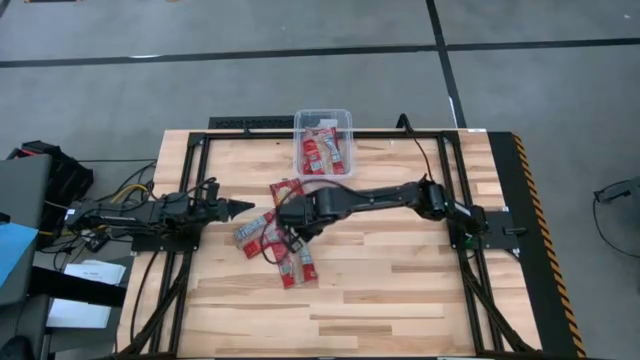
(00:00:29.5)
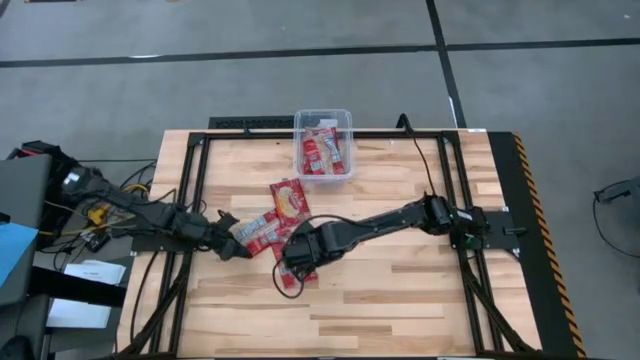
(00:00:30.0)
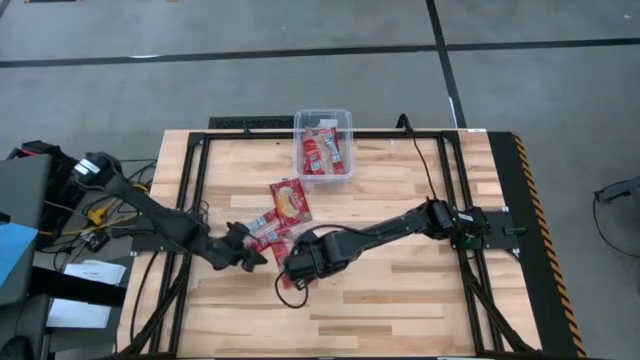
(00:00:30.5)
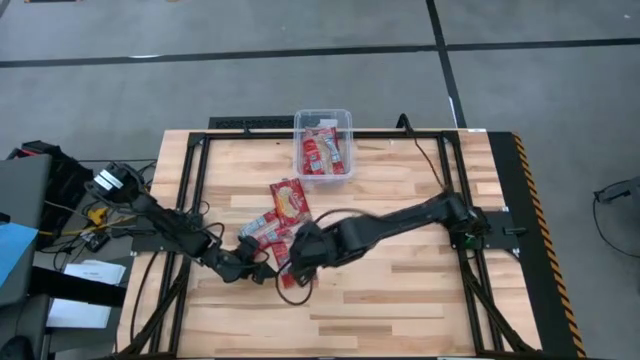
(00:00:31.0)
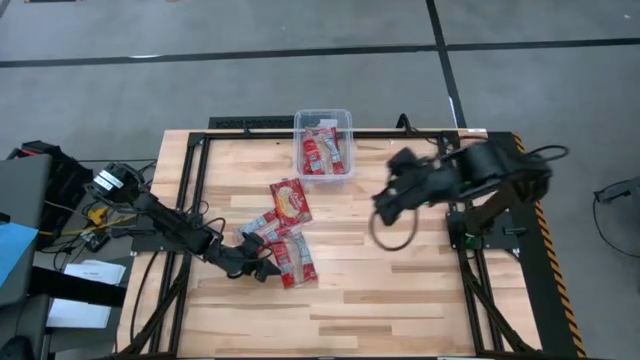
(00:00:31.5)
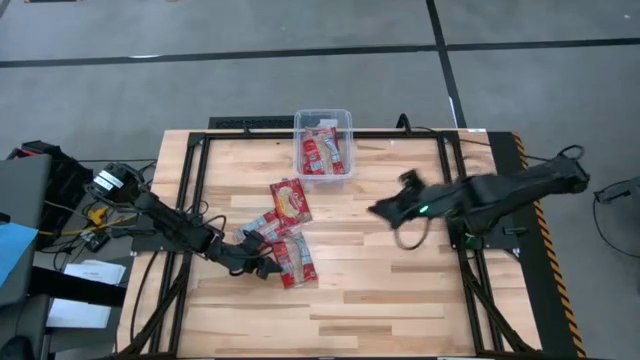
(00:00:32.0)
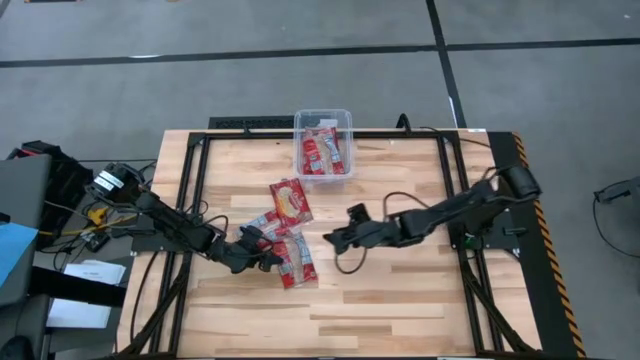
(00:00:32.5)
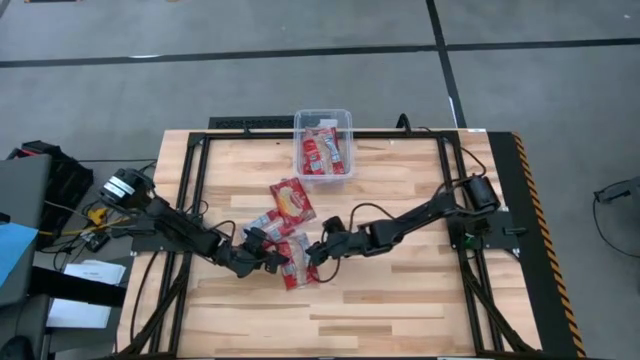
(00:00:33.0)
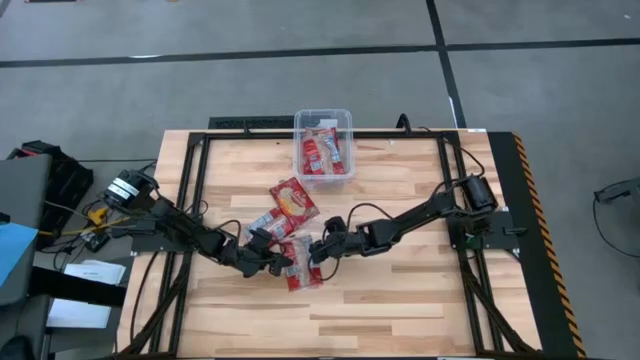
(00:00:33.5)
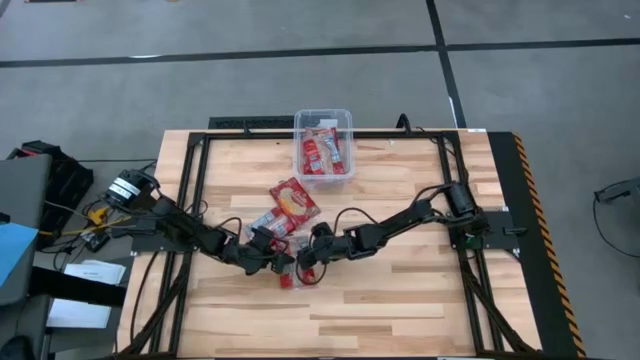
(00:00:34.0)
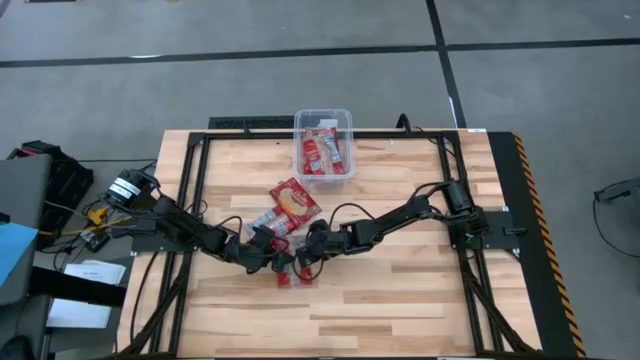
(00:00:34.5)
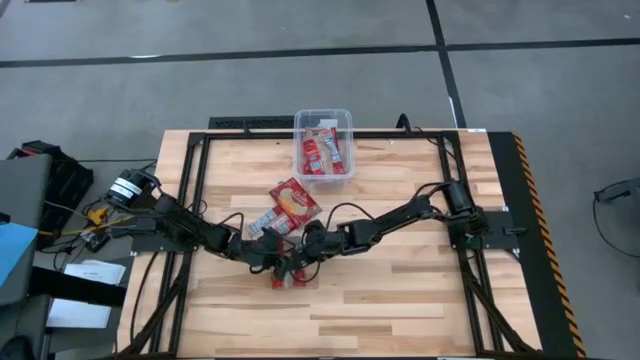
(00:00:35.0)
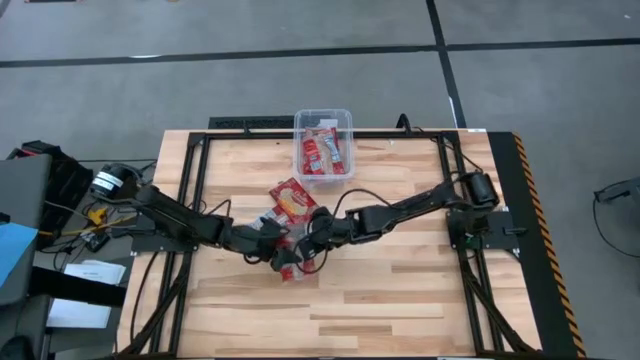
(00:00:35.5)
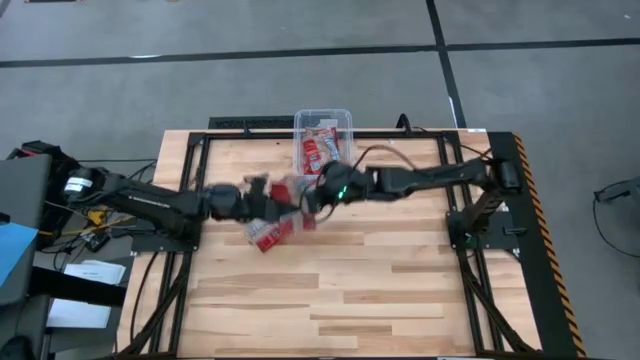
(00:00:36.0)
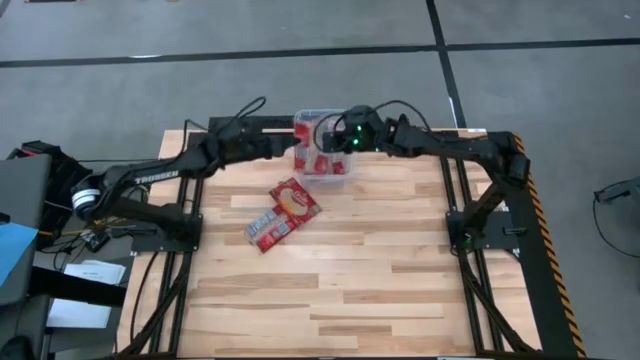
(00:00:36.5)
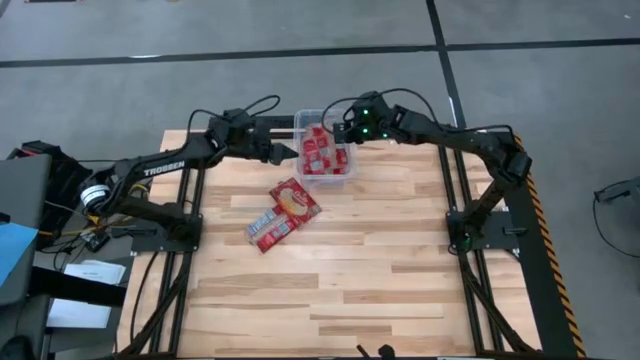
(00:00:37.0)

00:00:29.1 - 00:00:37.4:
Task: Sort popcorn bags into baskets
Put the red popcorn bag into the transparent bin

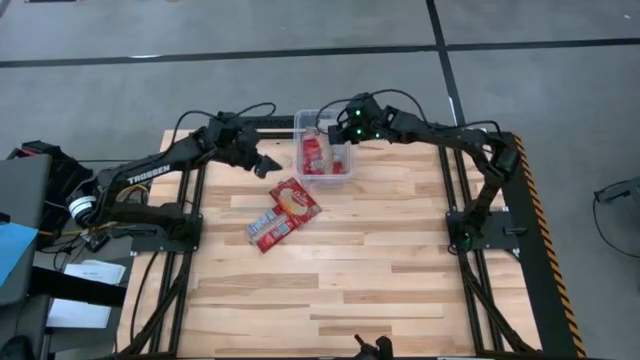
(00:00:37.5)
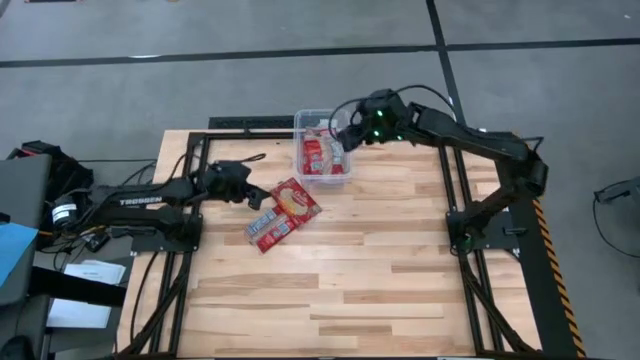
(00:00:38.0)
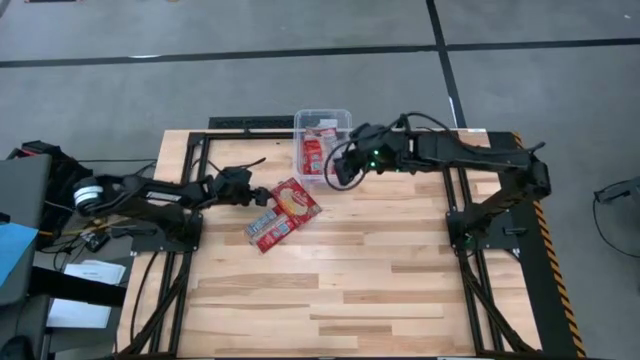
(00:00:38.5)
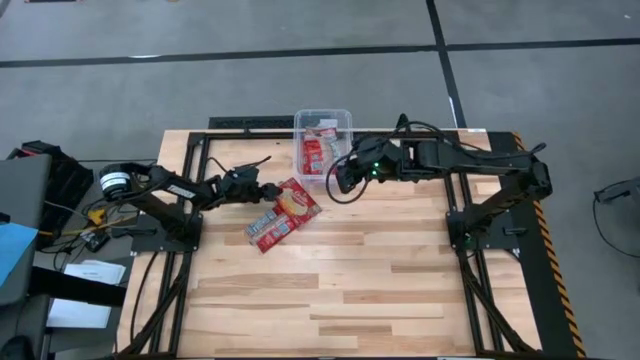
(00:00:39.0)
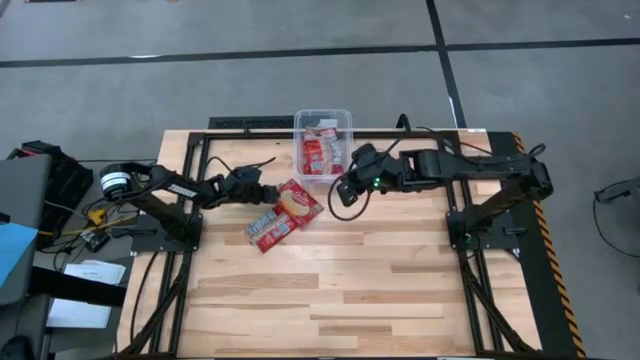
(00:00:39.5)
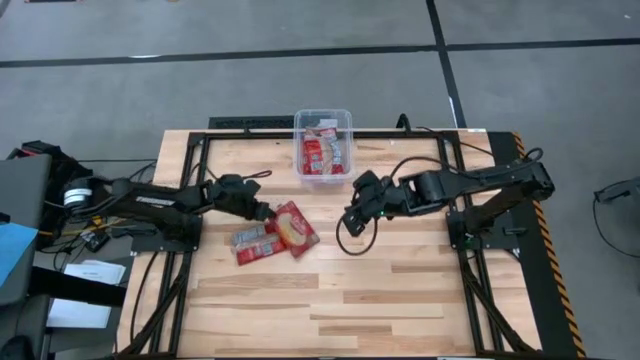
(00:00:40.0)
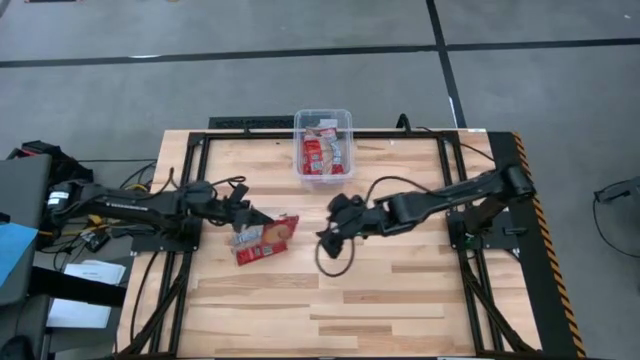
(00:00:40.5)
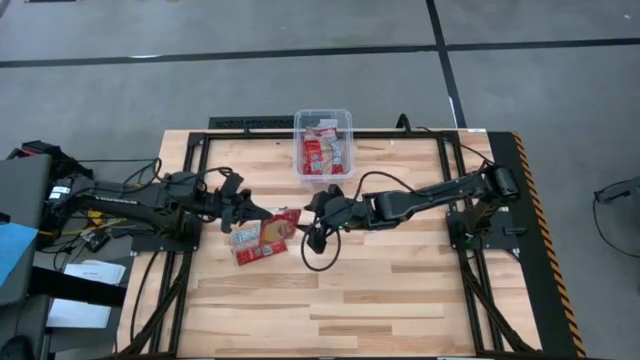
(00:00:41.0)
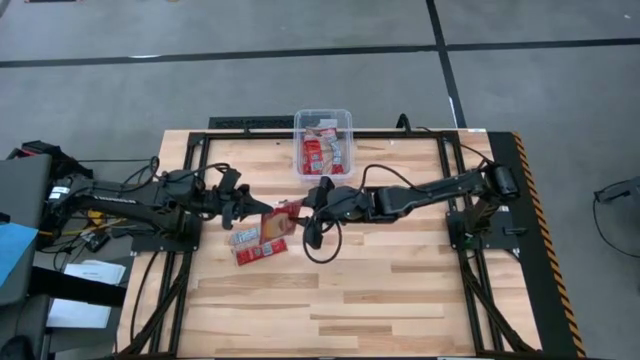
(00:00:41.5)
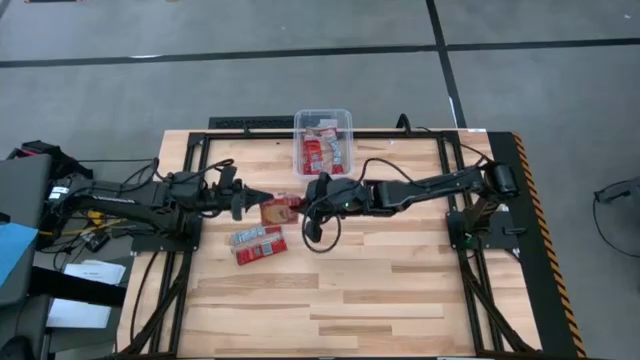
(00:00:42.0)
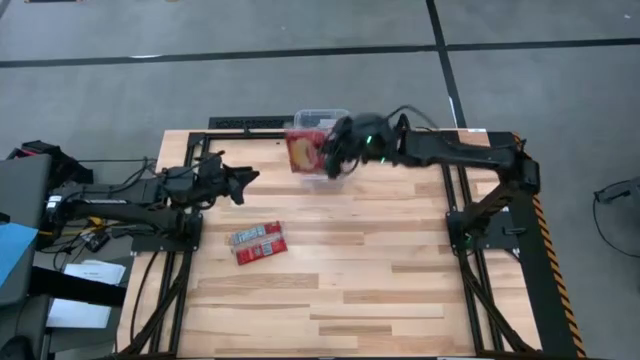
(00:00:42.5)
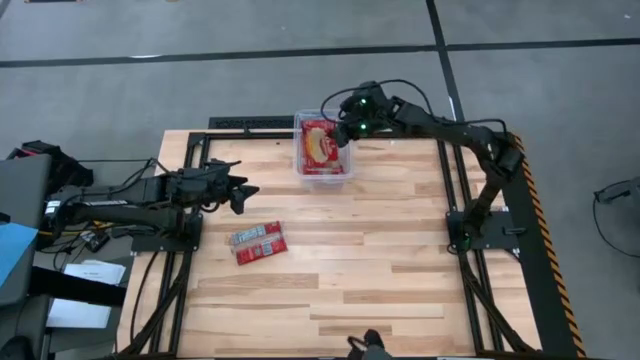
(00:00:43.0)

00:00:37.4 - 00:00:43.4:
Put the red popcorn bag into the transparent bin

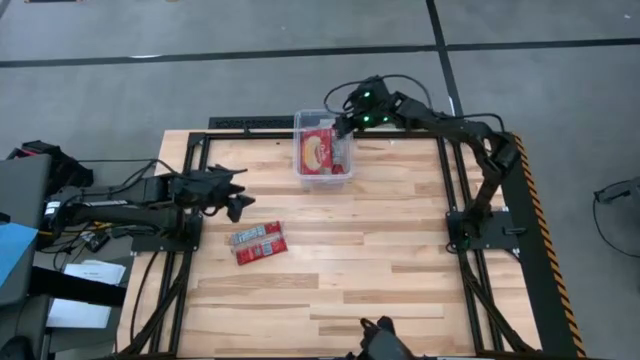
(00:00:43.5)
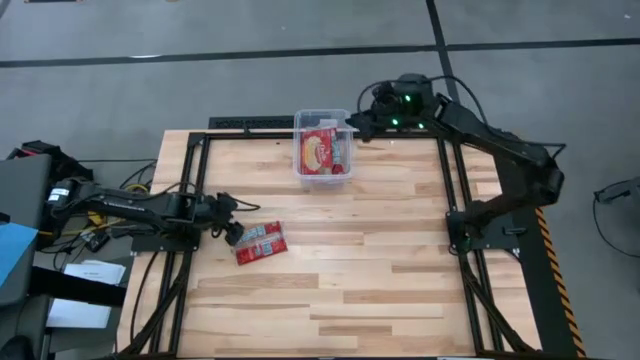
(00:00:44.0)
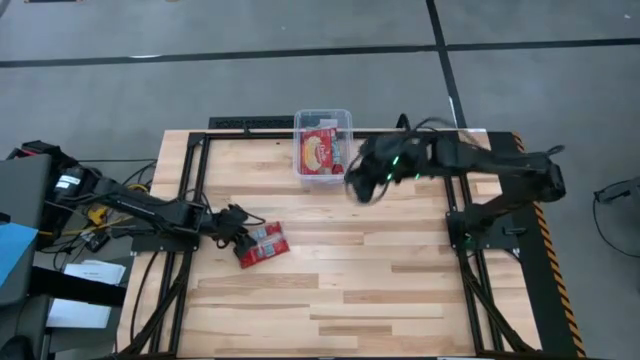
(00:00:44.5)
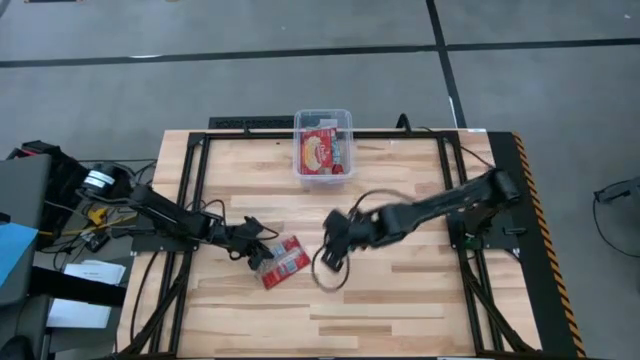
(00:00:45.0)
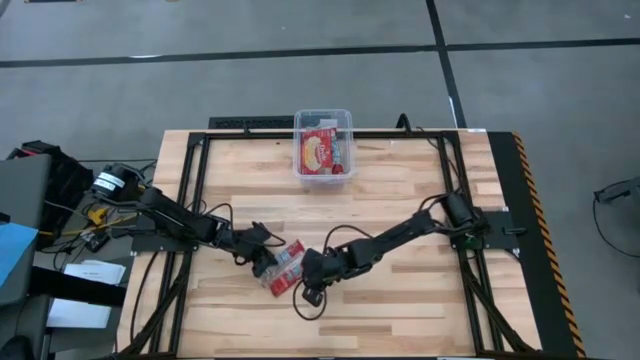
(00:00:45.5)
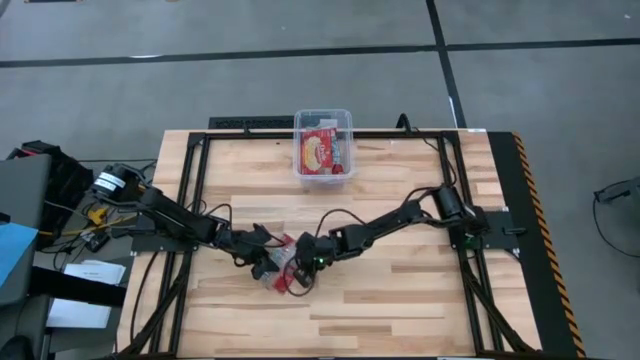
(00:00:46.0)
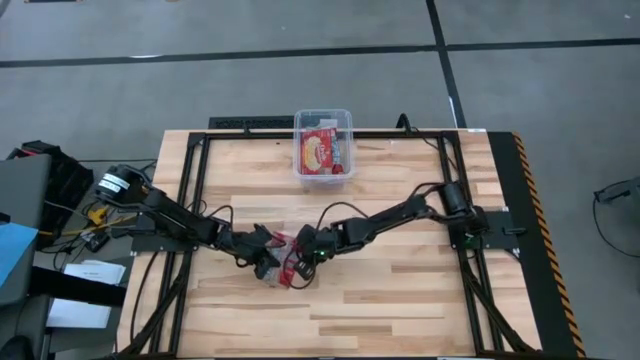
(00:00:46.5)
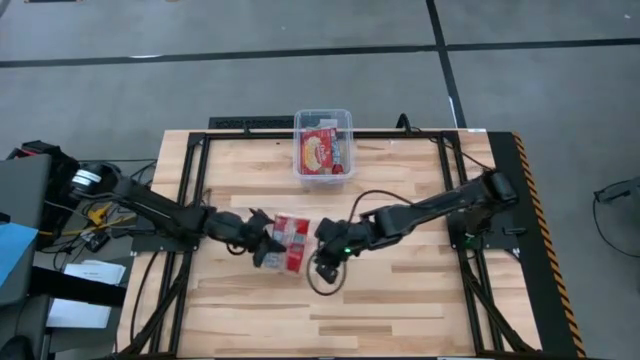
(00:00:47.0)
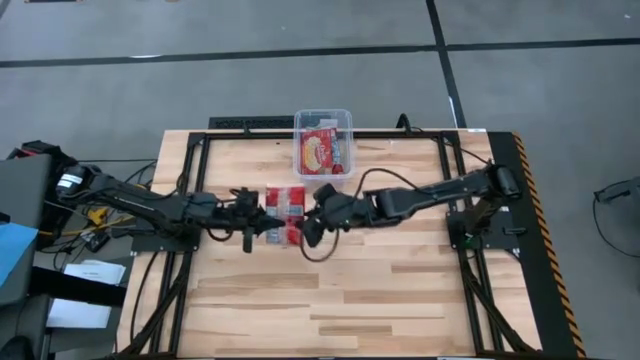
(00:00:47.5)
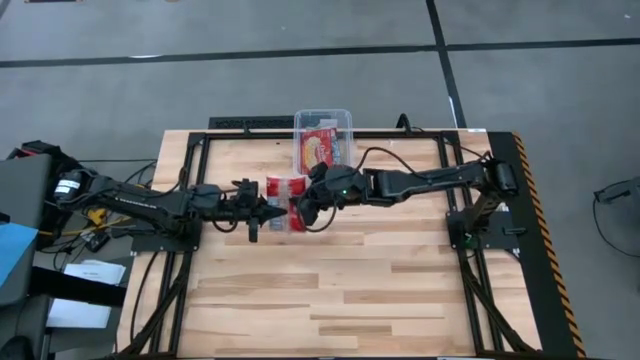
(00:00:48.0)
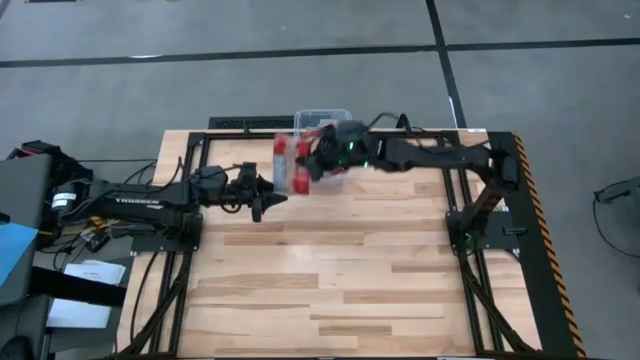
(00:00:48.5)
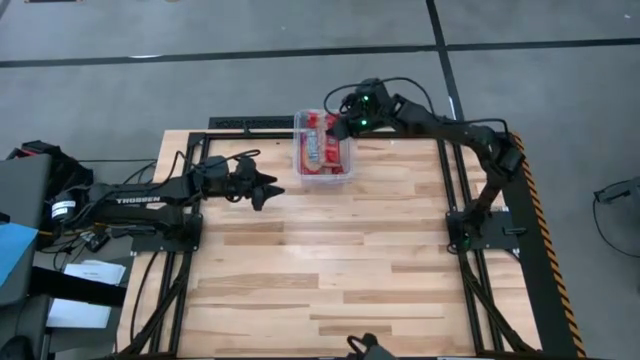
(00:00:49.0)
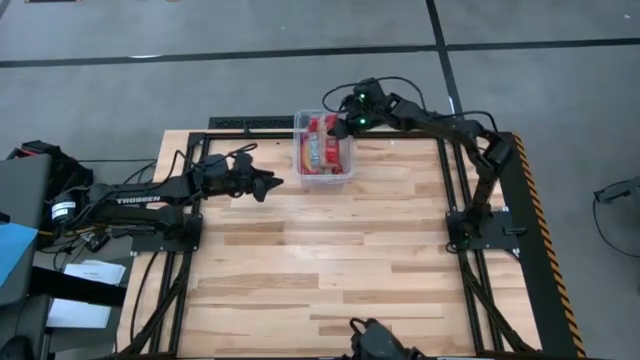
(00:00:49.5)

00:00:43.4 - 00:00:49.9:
Put the red popcorn bag into the transparent bin
